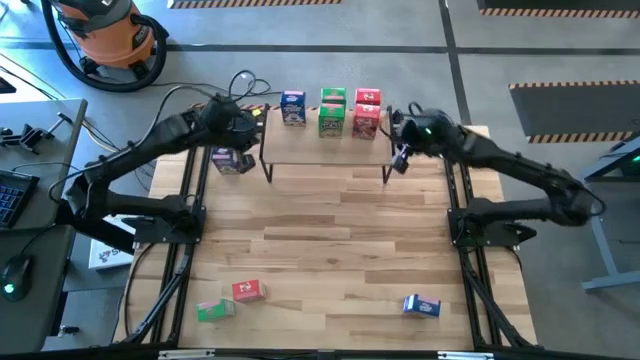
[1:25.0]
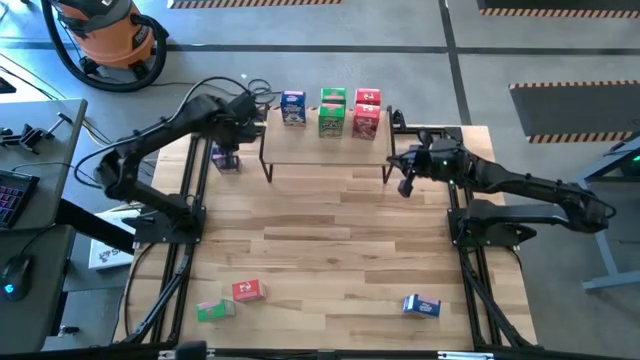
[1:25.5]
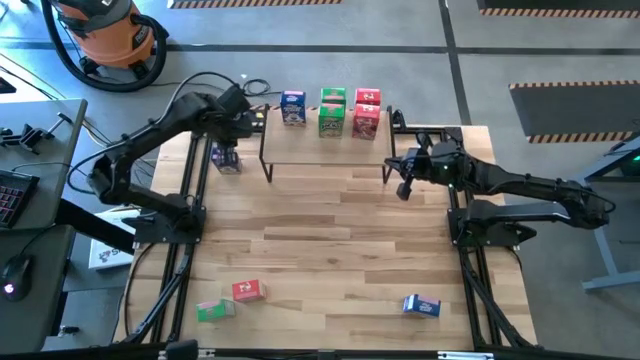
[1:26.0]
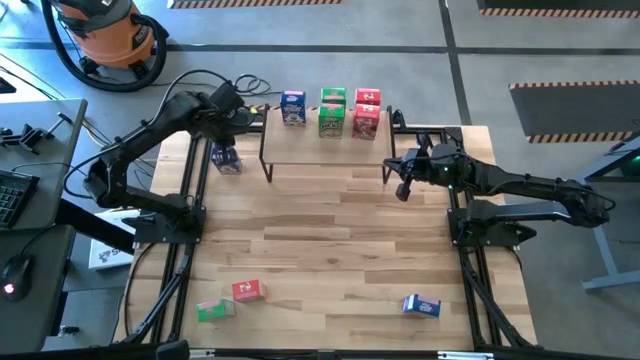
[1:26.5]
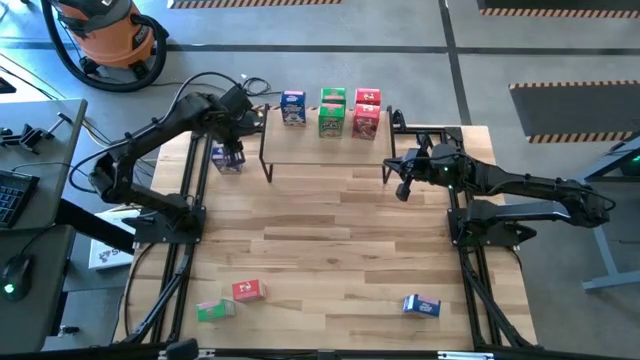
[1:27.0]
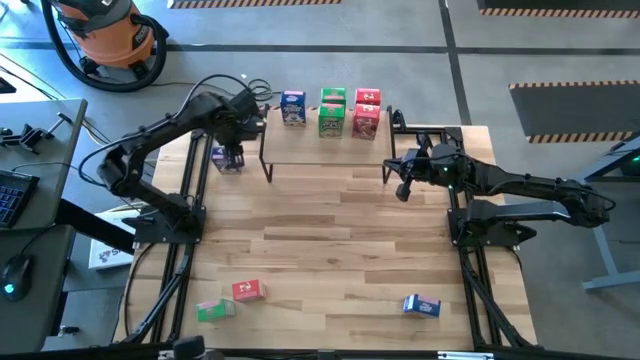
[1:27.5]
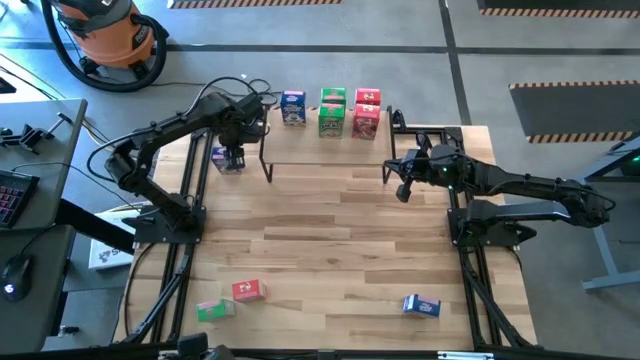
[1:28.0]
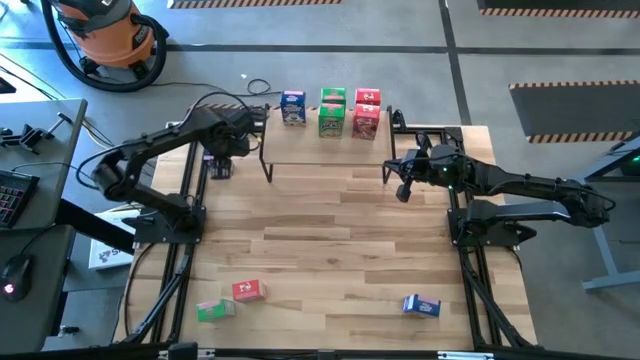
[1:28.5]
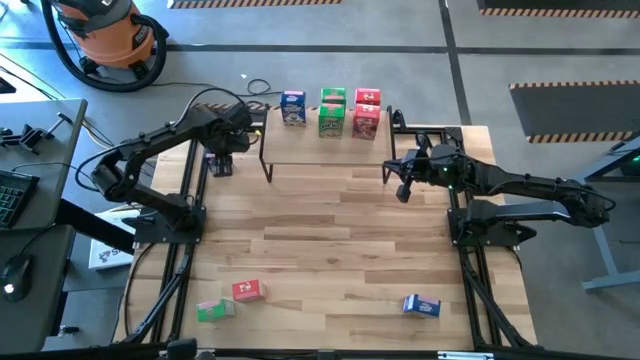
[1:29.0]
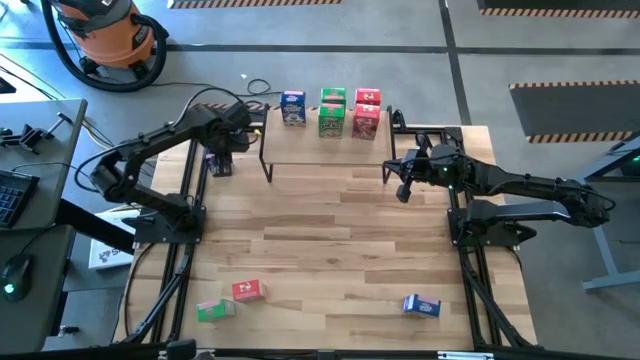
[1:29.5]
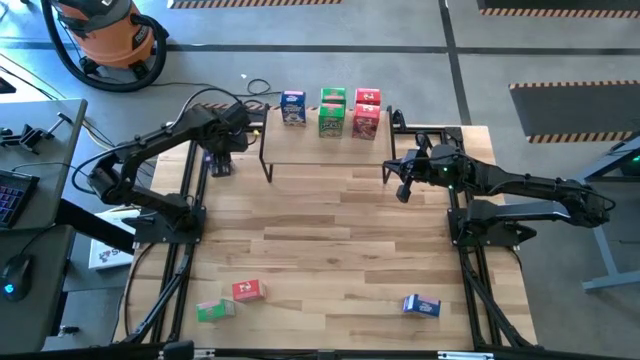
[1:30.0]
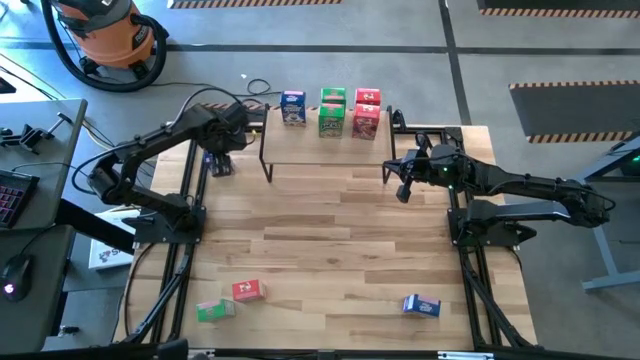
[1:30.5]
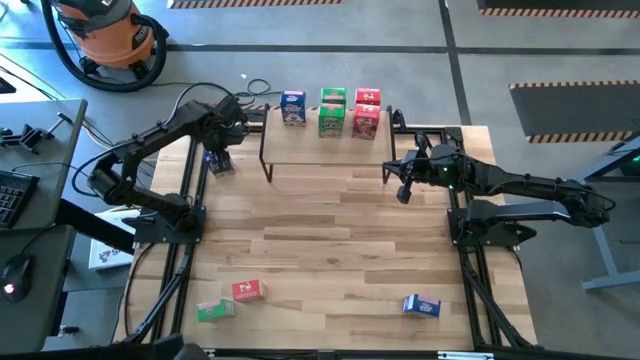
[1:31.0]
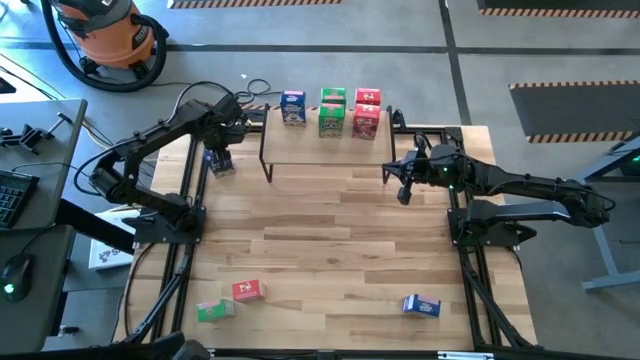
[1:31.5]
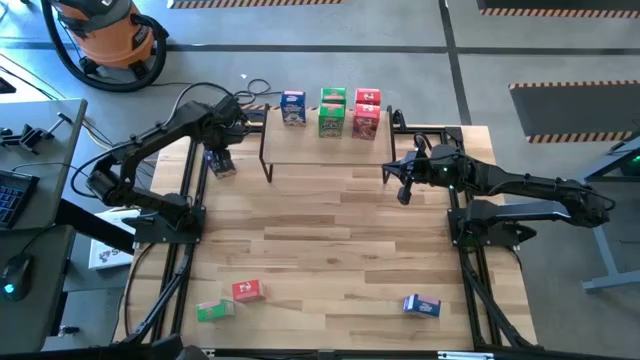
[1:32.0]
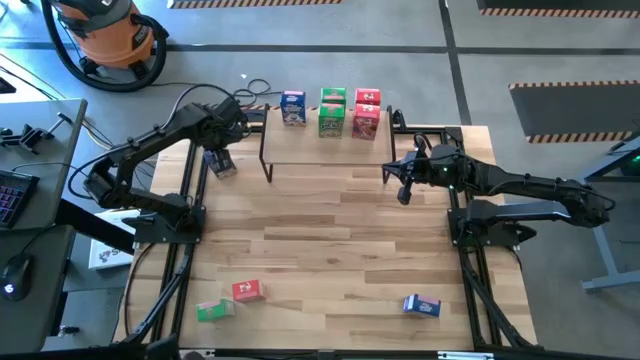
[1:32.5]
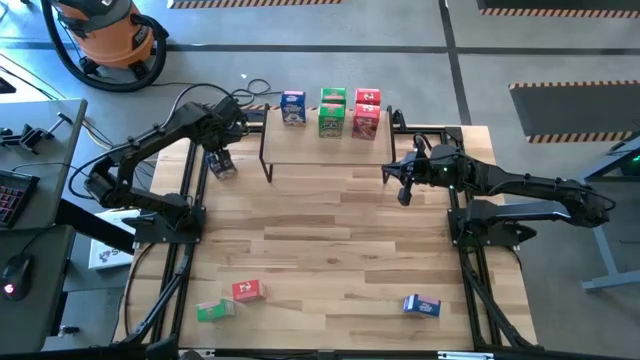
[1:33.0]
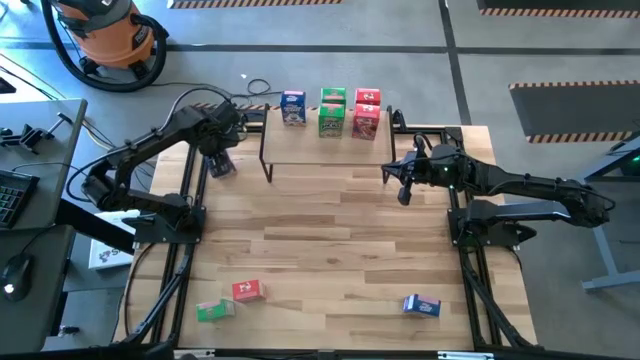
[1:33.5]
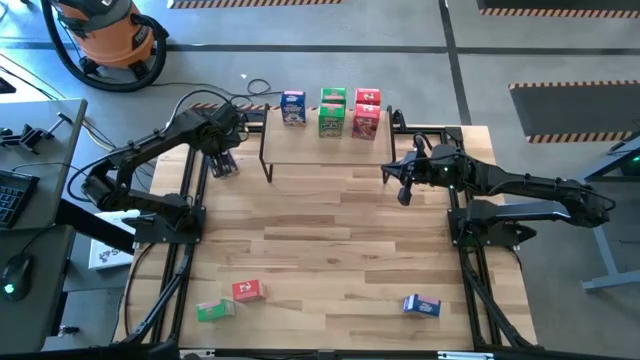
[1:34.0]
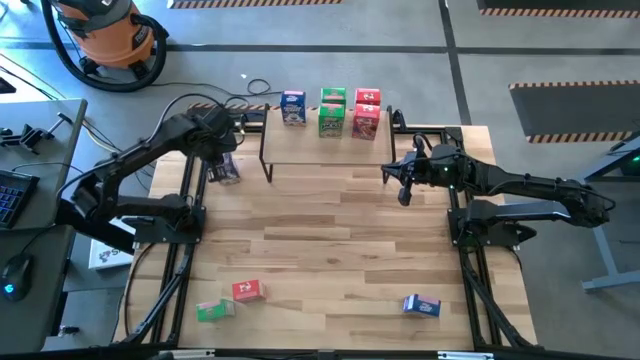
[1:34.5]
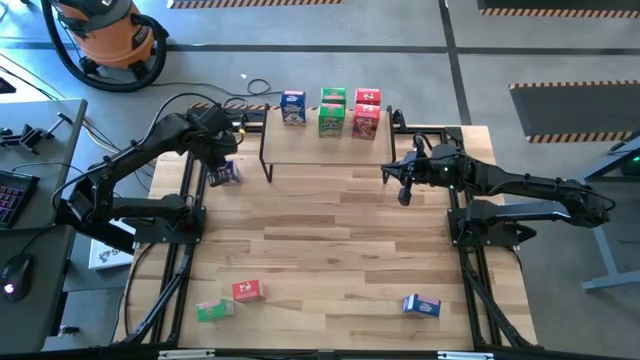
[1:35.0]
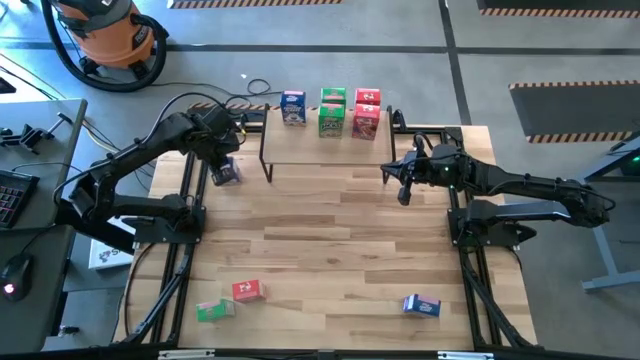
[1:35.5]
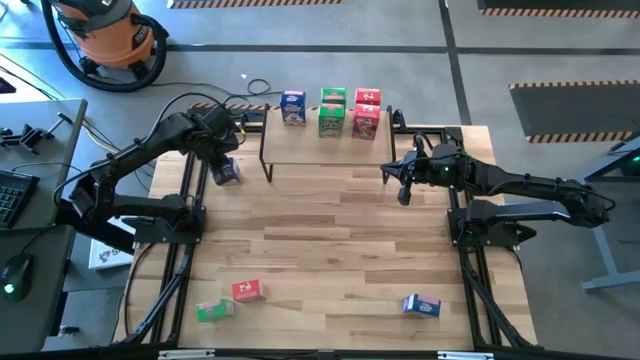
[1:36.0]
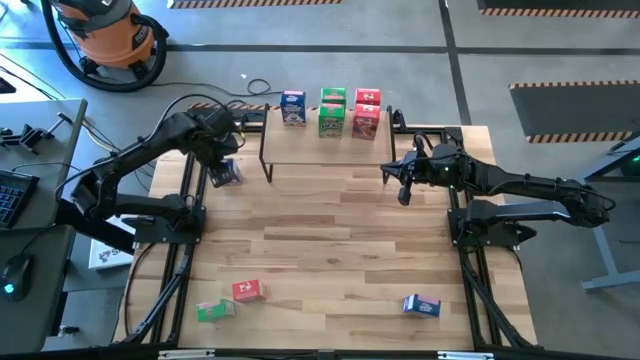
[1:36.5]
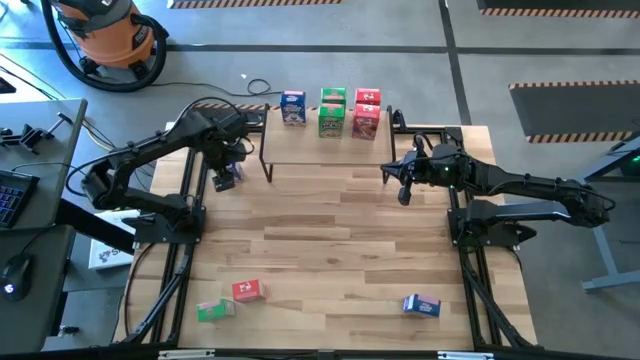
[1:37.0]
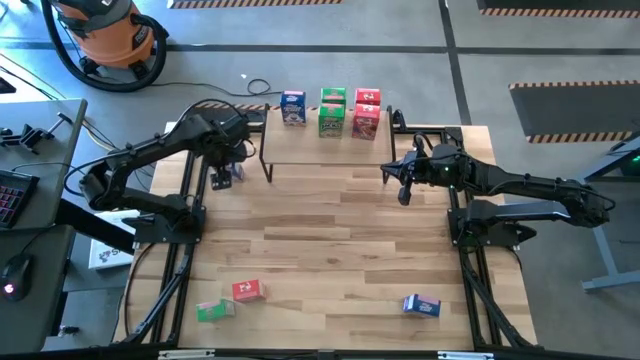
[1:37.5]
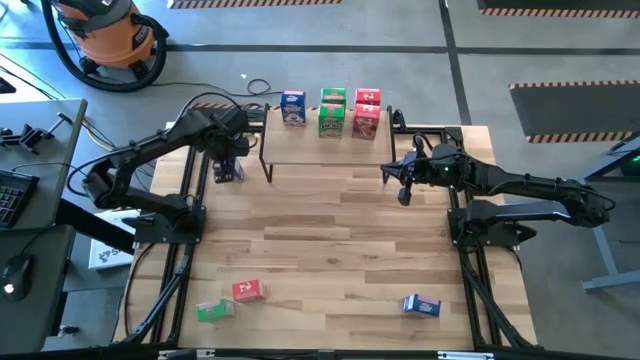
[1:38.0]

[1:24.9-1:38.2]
Task: Stack cereal on shelf
Put the top left blue cereal on the shelf aligned with the other blue cereal box

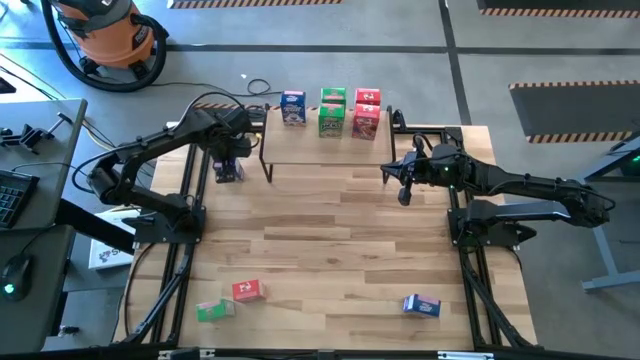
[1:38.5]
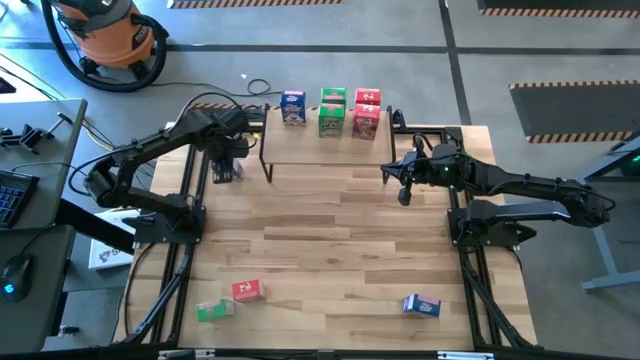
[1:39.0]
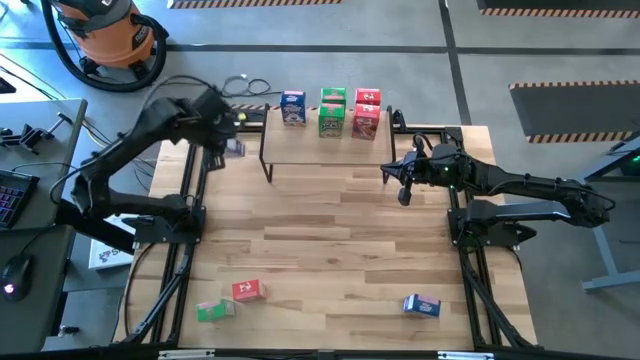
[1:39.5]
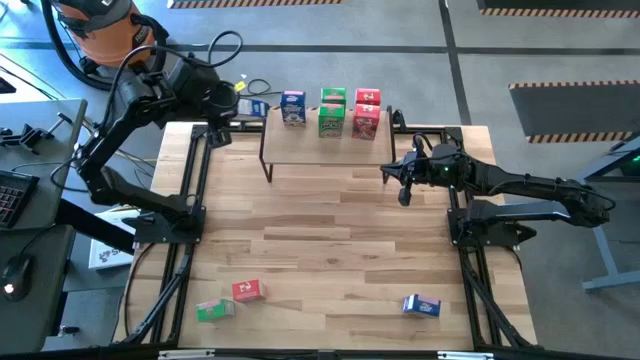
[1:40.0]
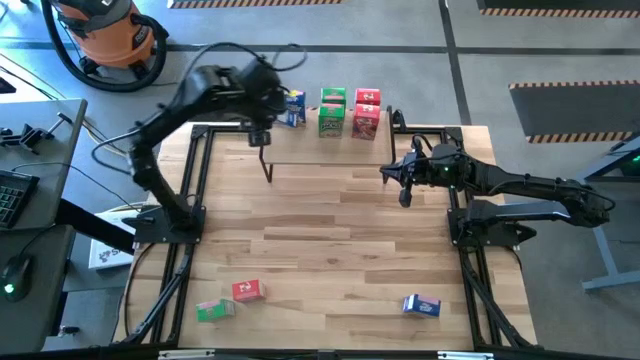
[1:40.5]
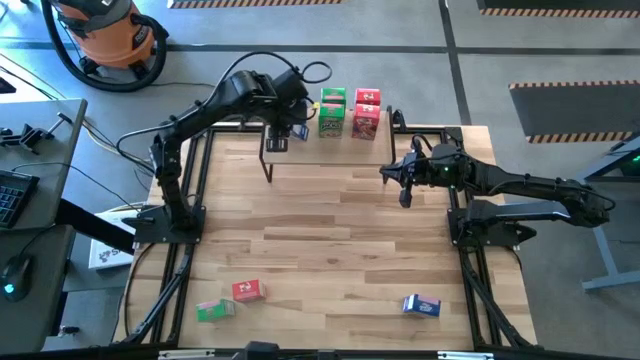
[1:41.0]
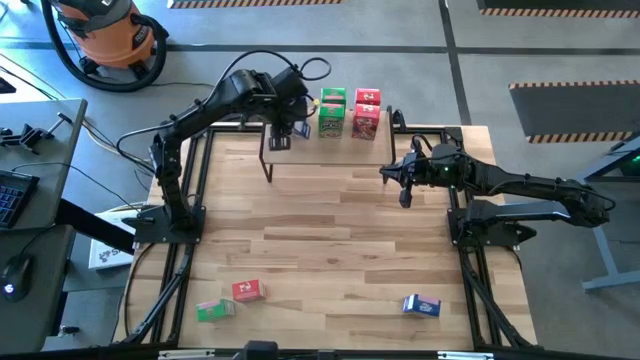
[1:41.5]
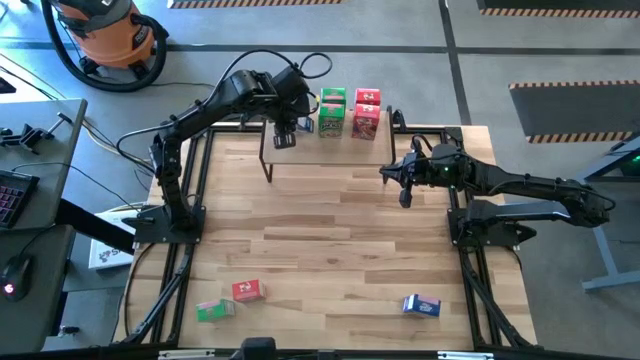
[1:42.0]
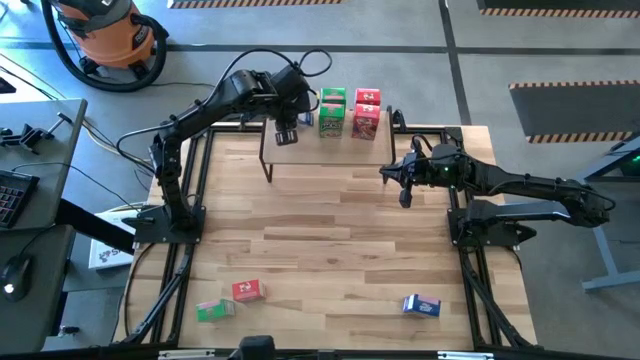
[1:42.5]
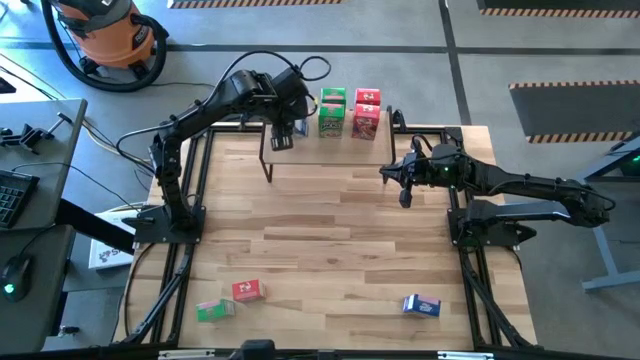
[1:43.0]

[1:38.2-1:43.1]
Put the top left blue cereal on the shelf aligned with the other blue cereal box

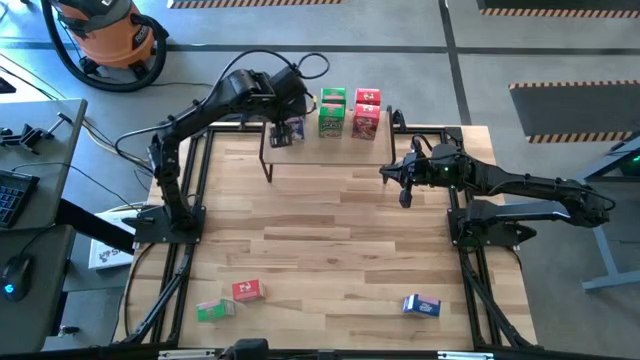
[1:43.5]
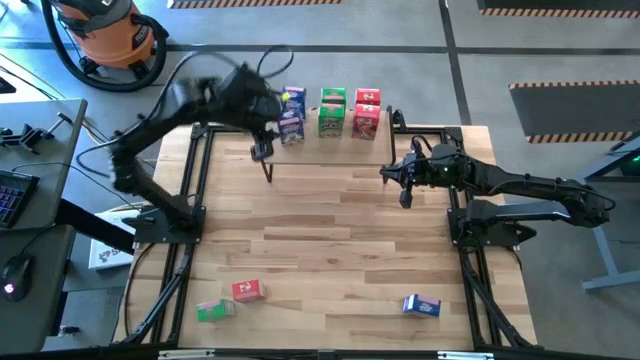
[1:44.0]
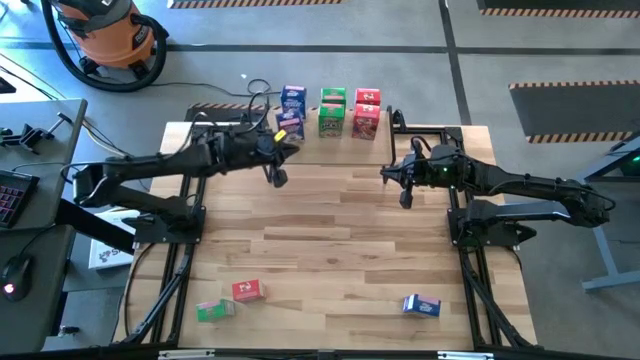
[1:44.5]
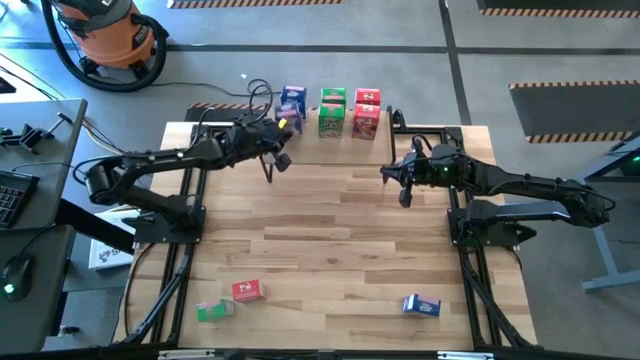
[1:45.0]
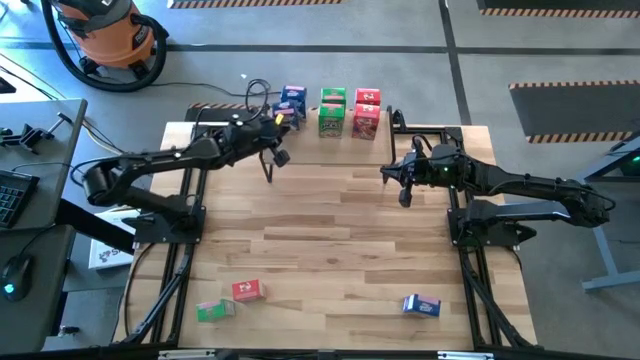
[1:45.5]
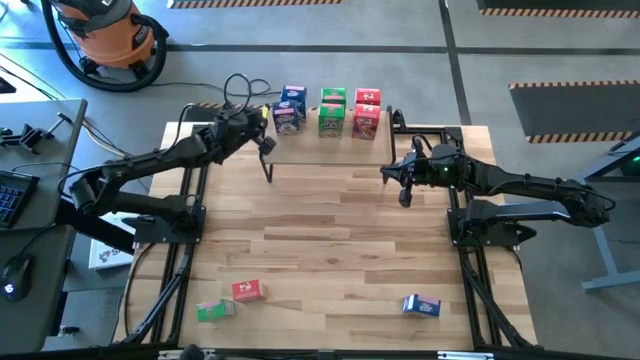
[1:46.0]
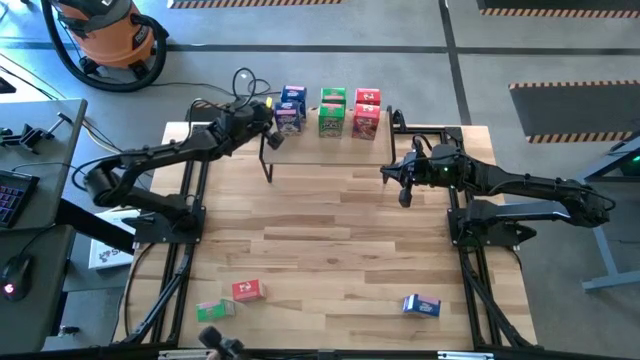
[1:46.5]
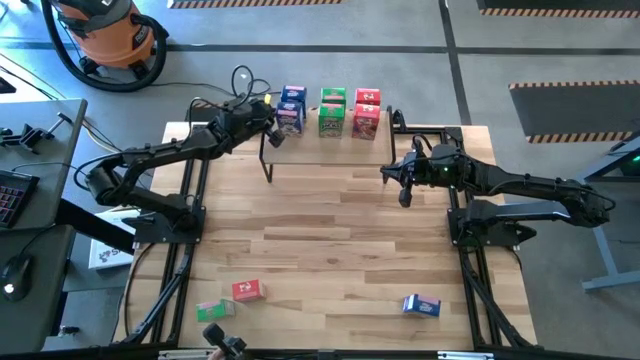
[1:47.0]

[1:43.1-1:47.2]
Adjust the bottom cereal box on the shelf
